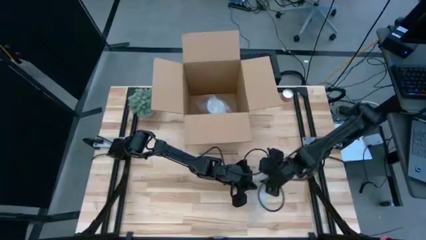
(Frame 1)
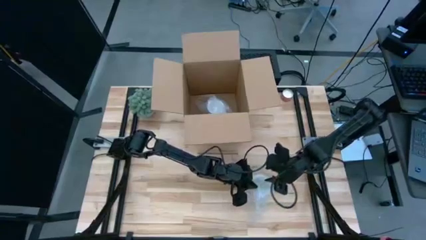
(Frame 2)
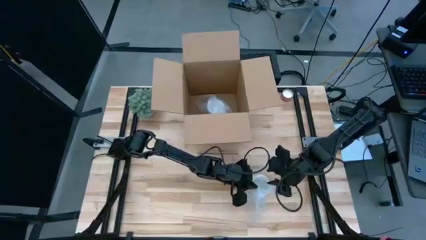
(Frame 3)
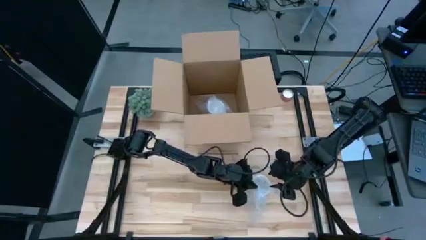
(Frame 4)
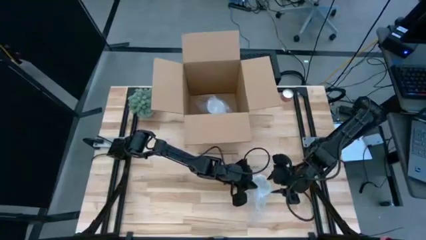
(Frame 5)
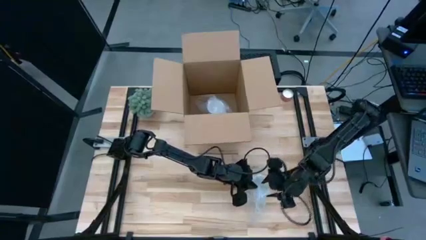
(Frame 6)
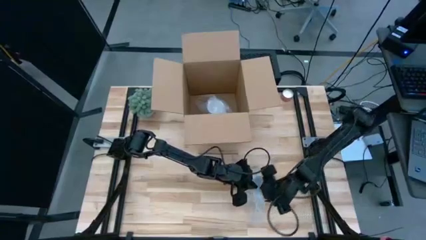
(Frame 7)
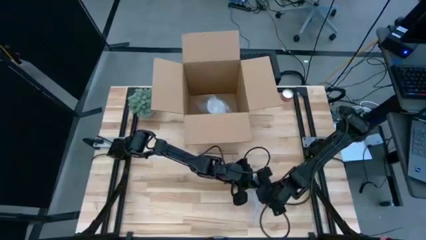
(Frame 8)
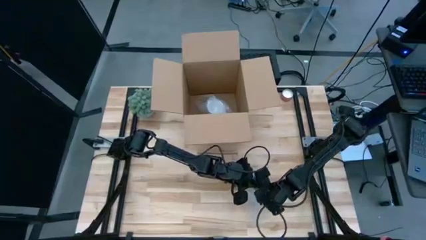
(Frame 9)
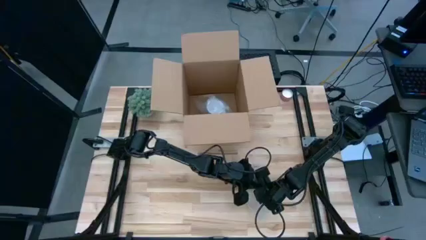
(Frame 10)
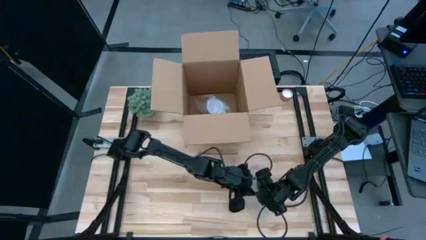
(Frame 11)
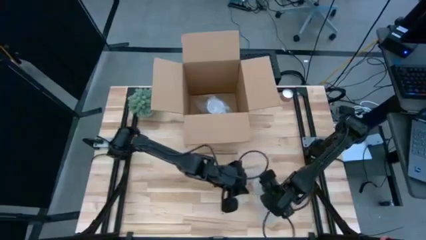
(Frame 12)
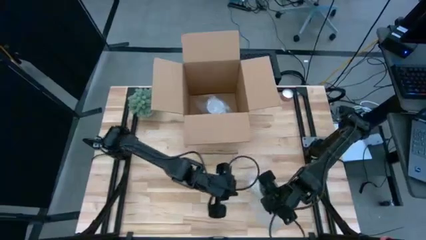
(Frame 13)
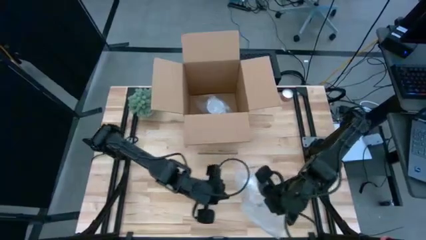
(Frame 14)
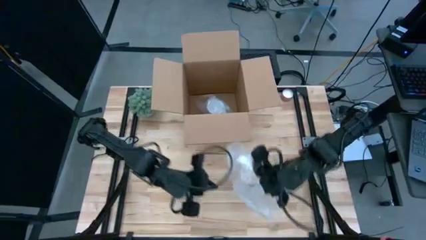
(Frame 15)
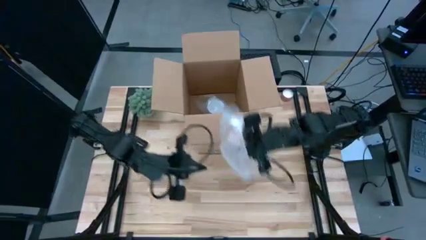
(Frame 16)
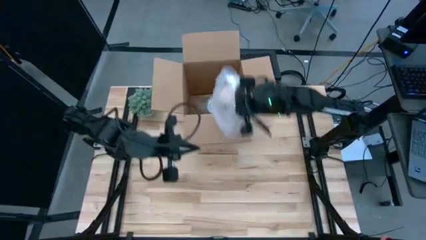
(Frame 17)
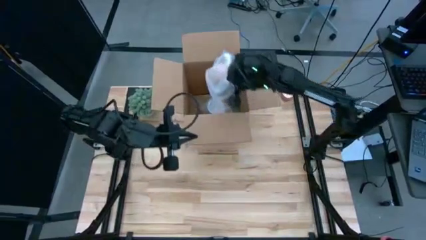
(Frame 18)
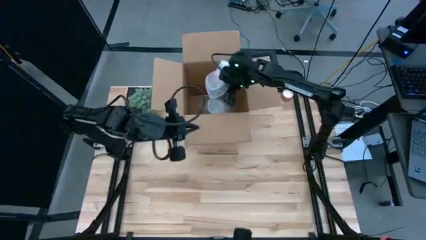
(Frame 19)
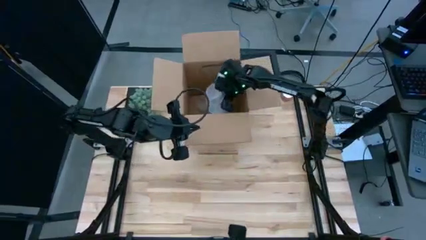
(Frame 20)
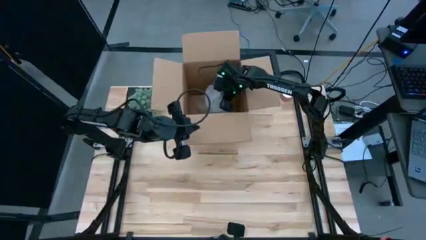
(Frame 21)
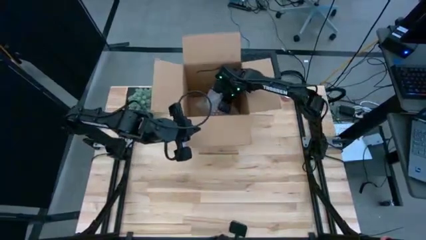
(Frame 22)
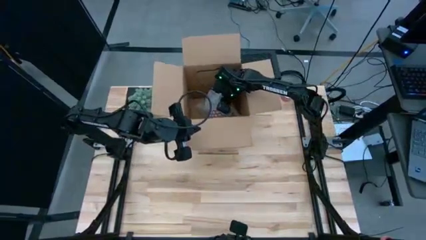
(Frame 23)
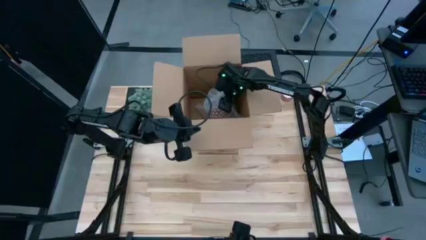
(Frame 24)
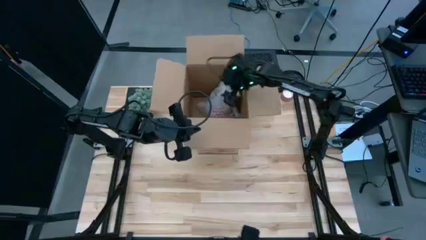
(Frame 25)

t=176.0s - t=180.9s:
Task: wrap mug
Put the wrapped orange mug into the cardboard box

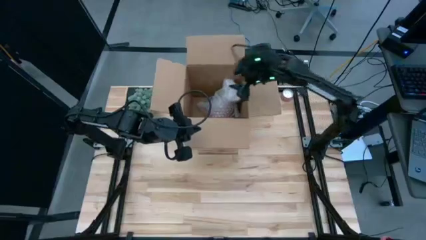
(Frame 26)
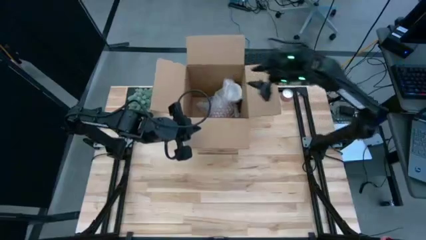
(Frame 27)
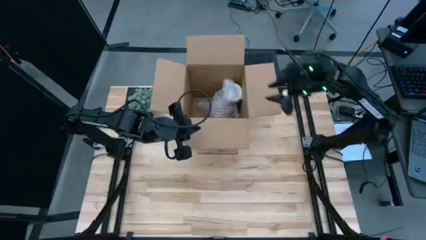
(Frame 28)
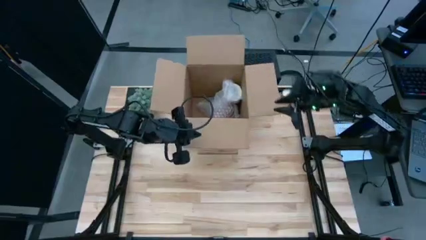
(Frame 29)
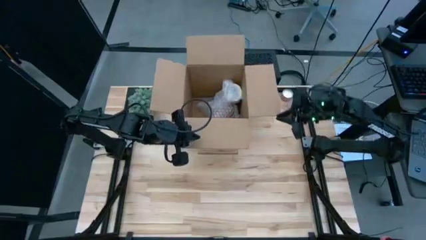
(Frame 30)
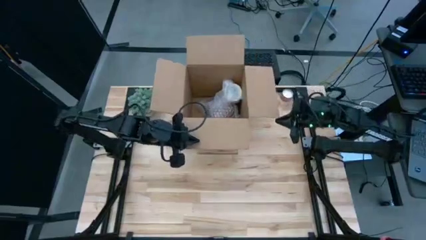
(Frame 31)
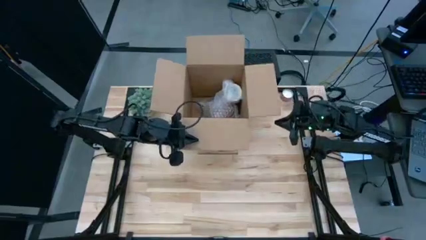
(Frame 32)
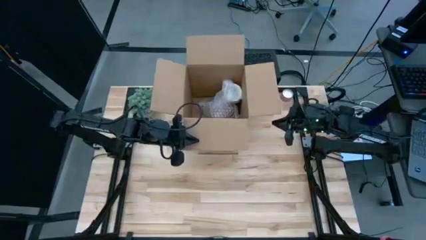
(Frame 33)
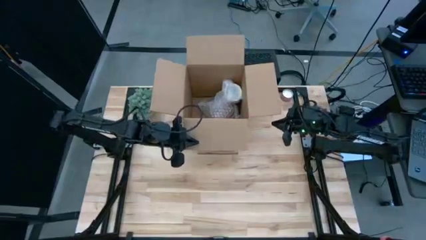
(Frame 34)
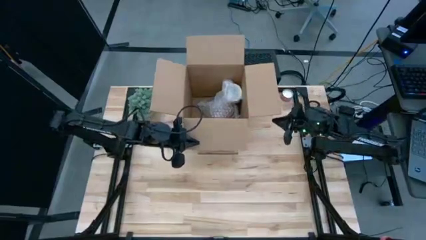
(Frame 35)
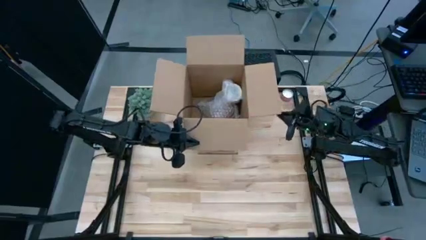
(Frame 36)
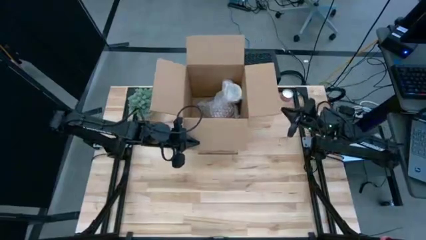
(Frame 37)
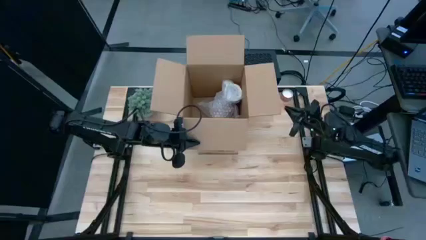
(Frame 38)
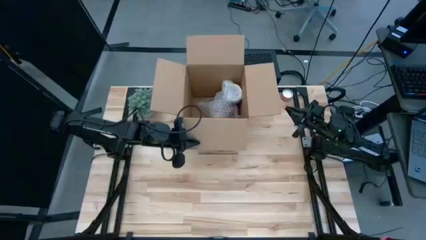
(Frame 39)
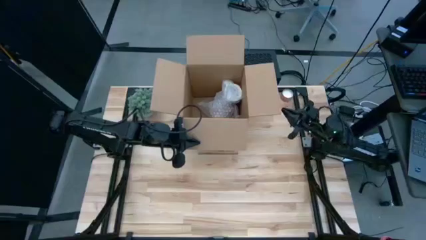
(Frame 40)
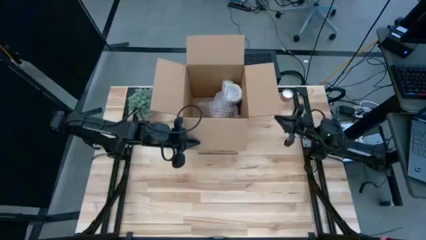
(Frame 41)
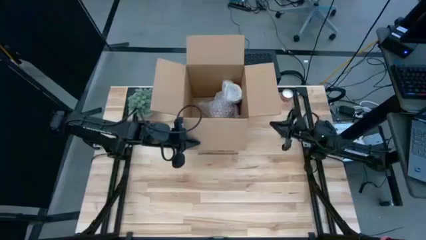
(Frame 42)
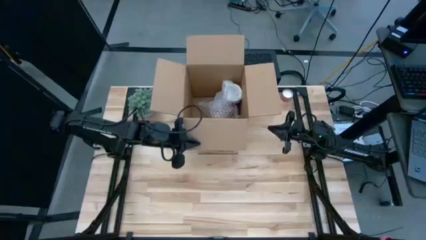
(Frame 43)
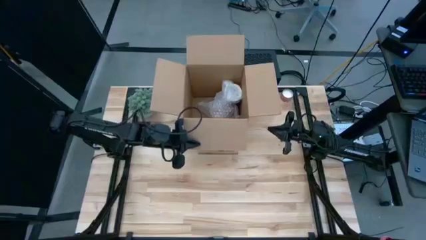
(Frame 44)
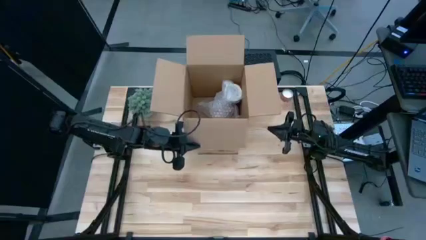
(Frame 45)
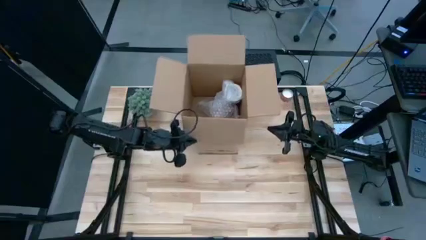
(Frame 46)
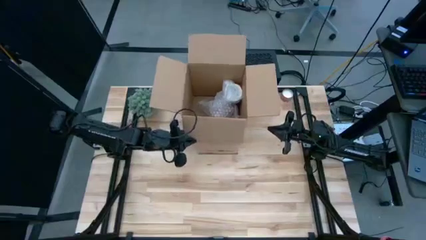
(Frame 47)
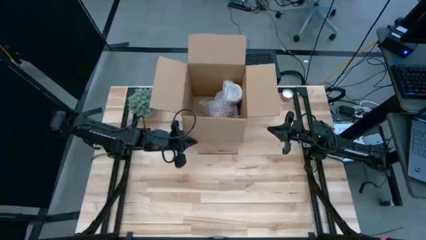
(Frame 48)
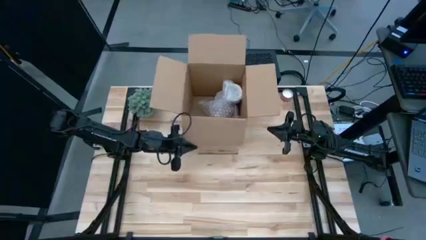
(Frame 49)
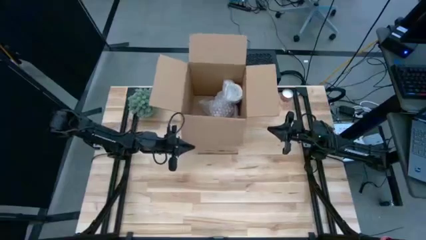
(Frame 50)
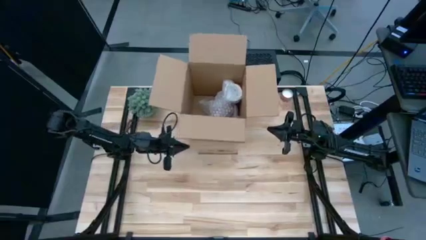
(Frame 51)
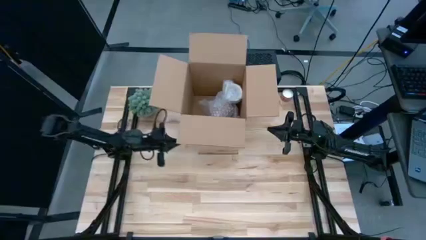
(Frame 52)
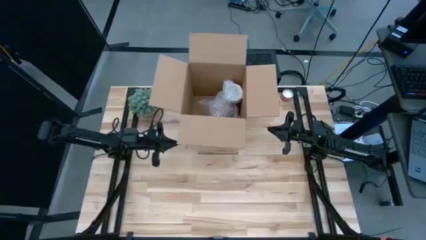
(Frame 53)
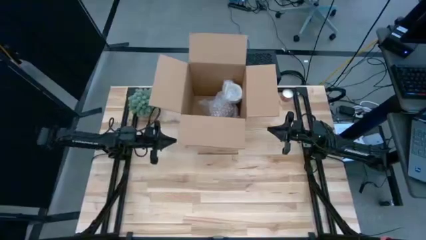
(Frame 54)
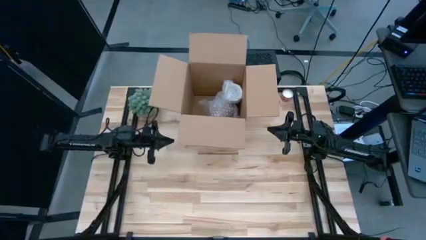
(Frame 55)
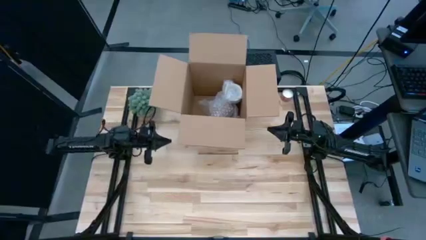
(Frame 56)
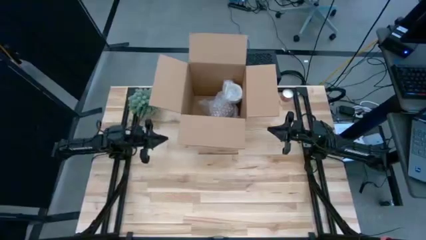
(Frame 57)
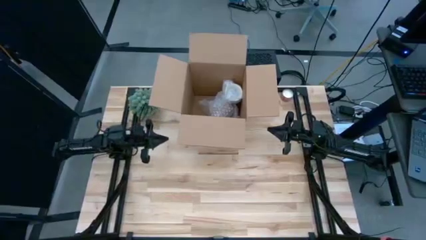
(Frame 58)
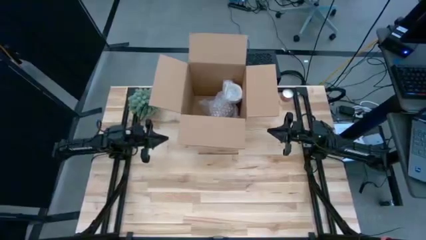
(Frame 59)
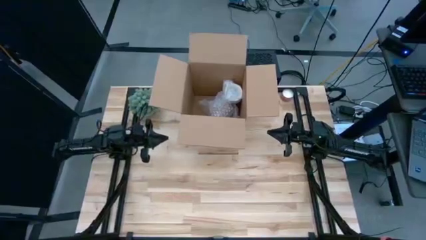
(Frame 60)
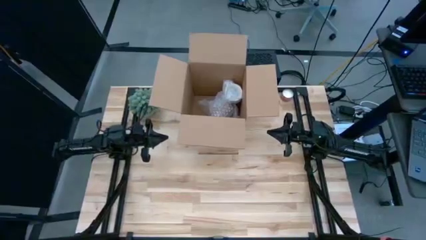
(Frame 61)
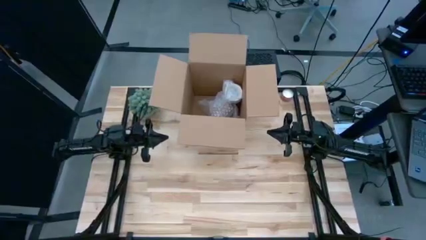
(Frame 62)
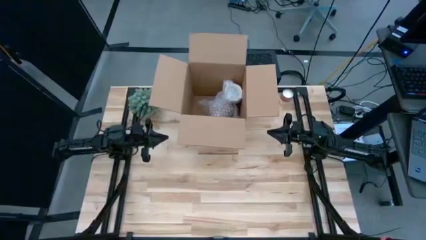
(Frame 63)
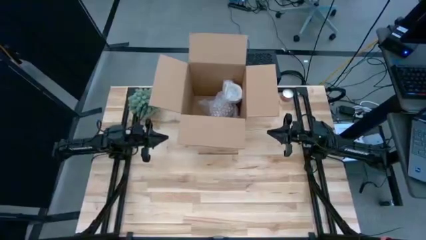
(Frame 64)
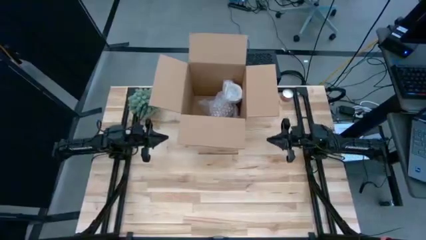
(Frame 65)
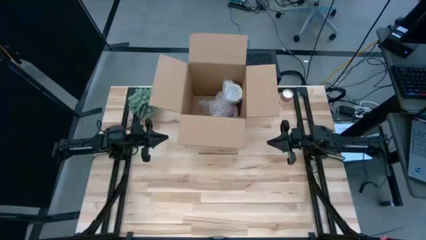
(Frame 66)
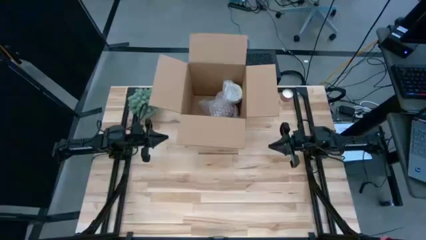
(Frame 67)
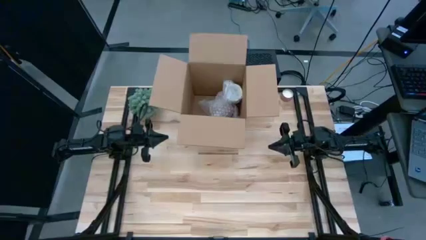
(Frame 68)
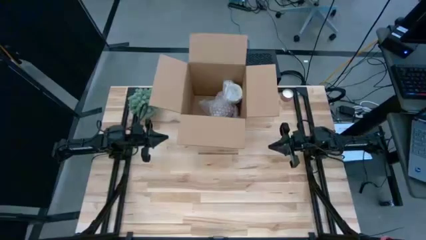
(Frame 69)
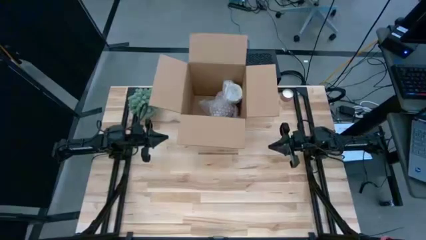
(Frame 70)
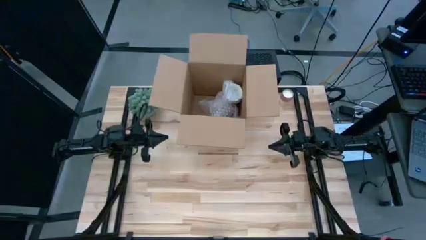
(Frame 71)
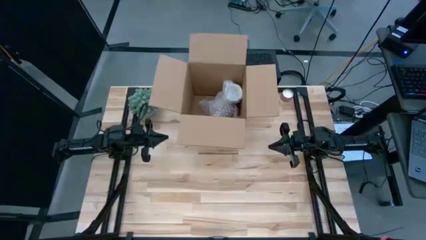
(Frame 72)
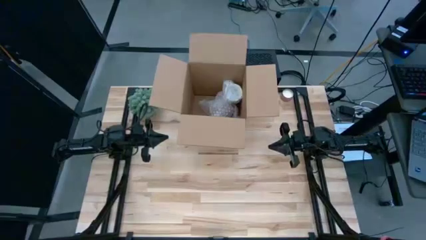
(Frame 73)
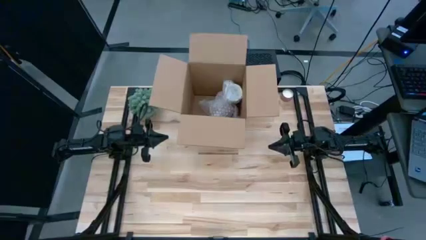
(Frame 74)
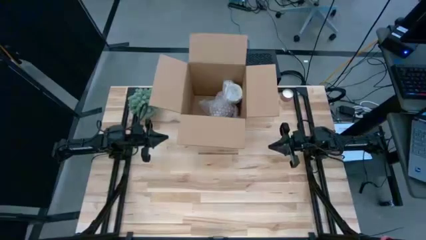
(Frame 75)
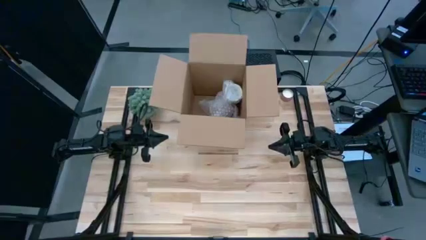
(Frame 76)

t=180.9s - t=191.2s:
Return to Home Position
